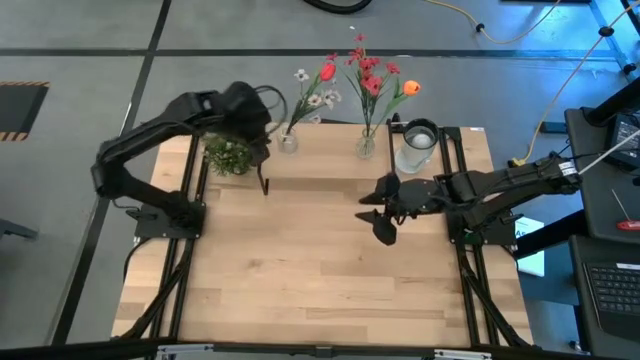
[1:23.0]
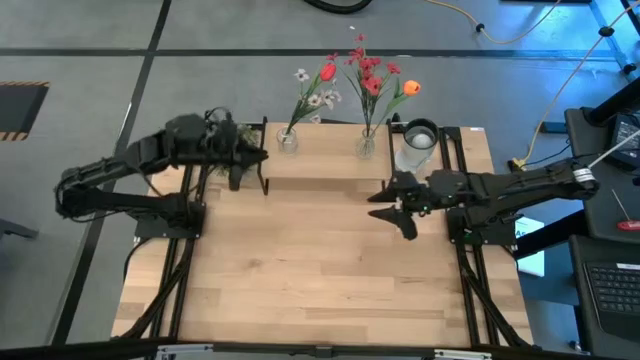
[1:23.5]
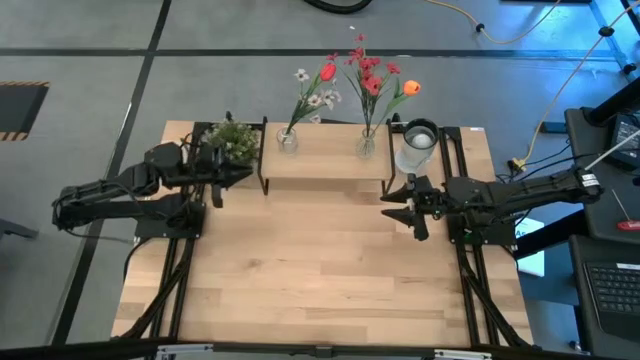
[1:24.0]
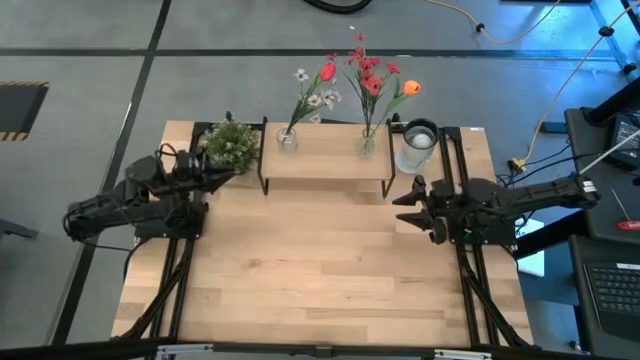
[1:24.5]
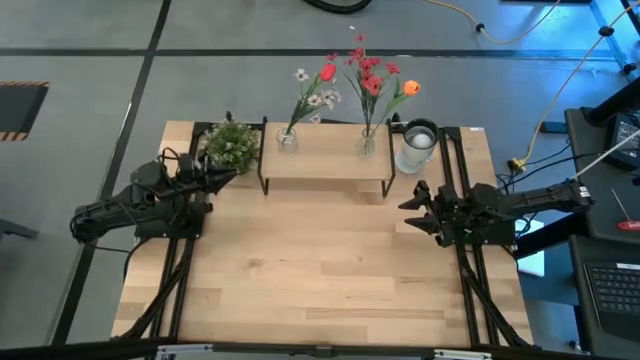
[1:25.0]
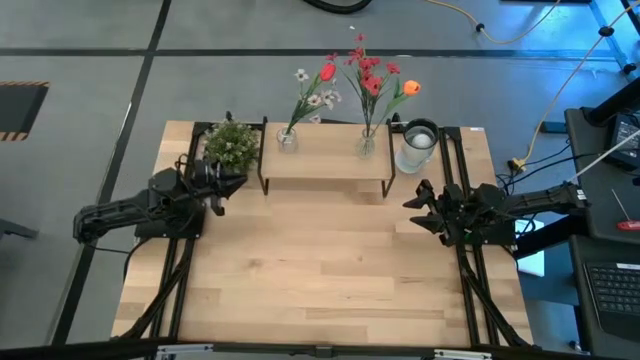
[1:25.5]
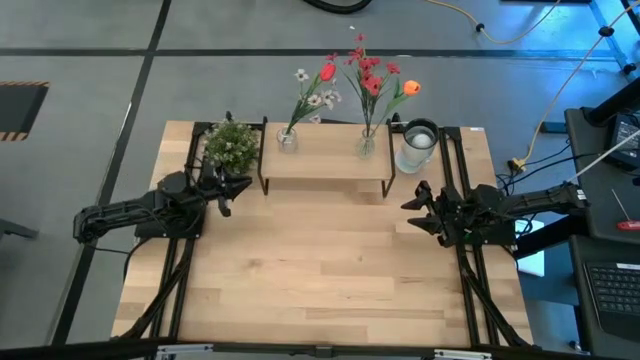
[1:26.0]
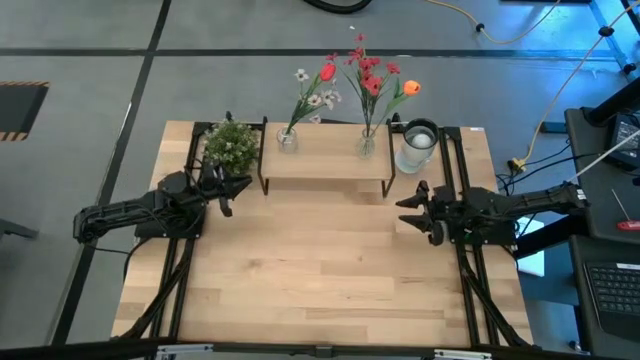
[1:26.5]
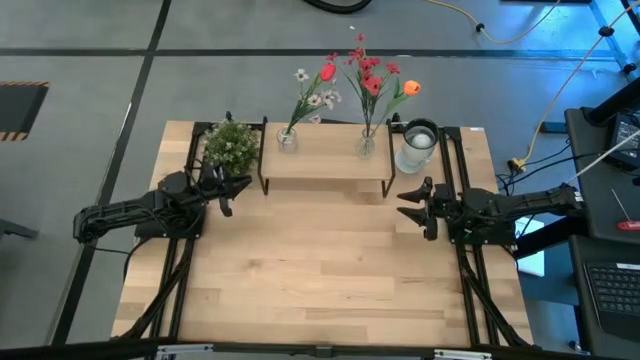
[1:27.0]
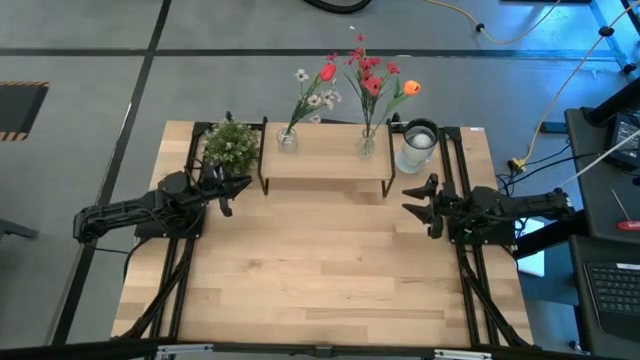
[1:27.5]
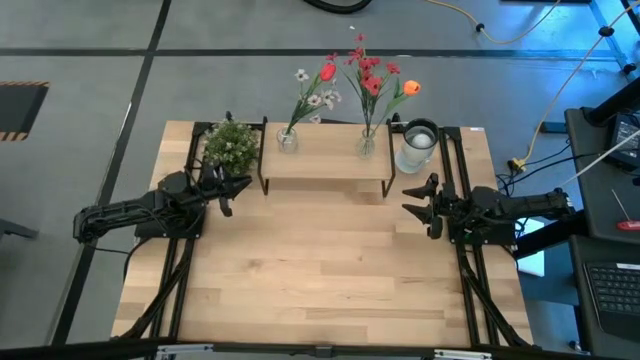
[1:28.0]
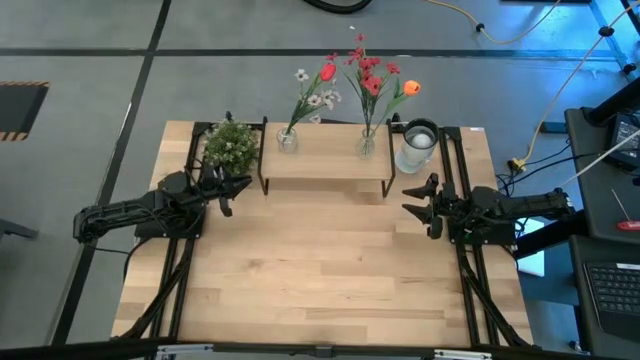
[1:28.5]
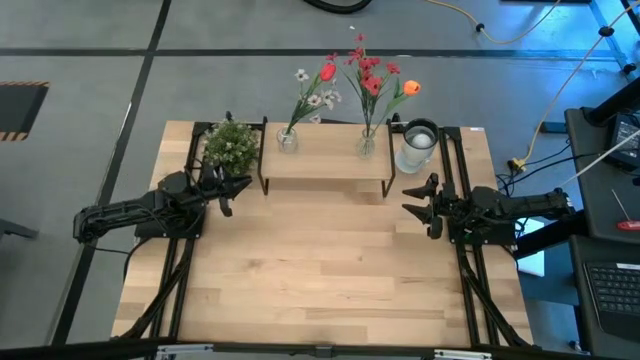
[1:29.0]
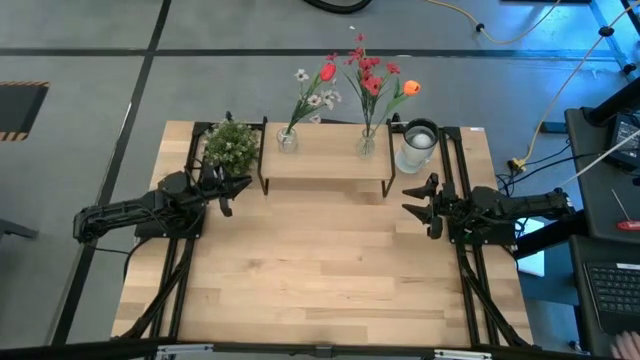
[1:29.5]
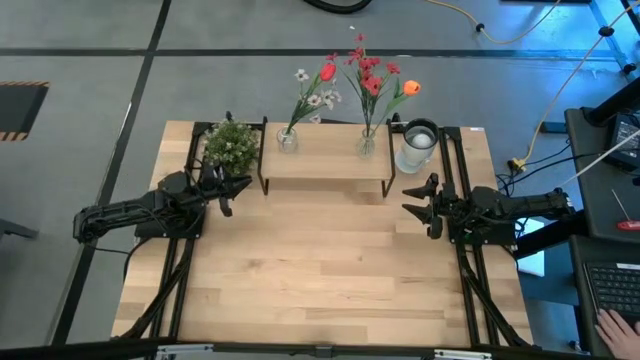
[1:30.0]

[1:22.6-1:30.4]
Task: Pick and place flowers into a vace then onto a shelf
Return to Home Position

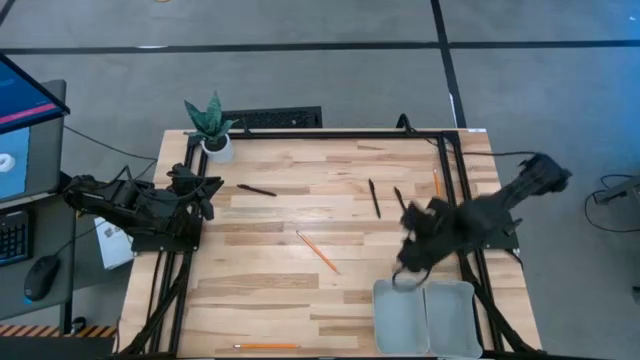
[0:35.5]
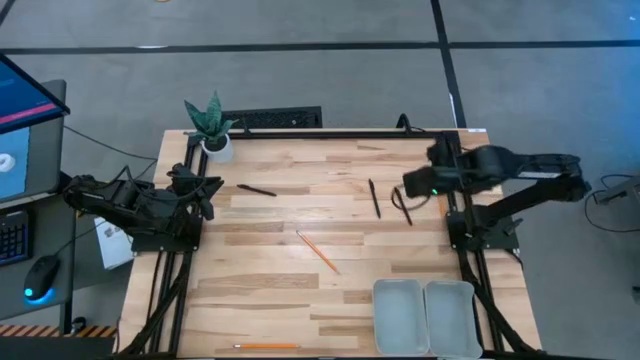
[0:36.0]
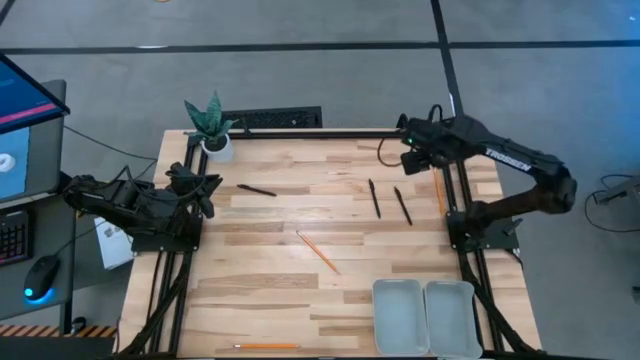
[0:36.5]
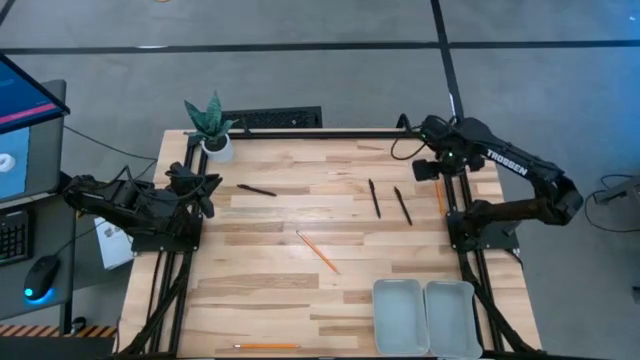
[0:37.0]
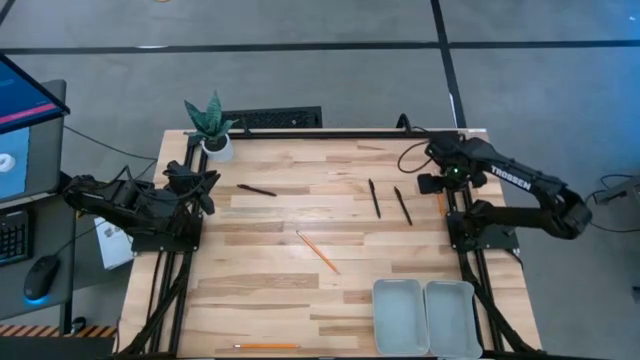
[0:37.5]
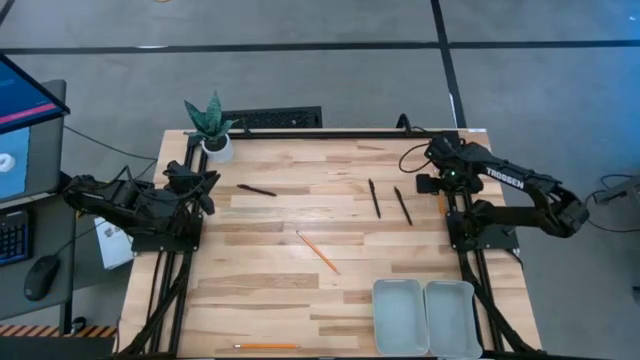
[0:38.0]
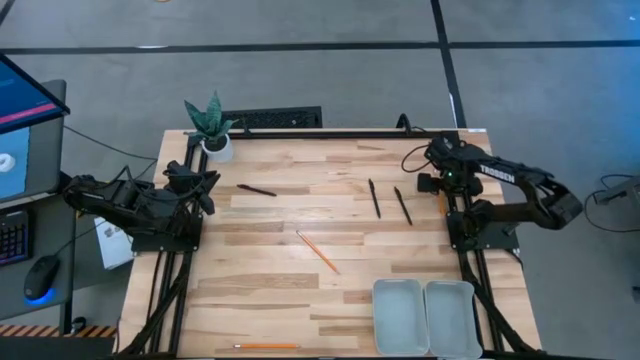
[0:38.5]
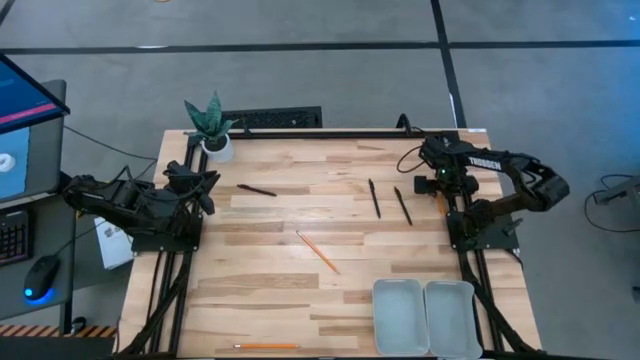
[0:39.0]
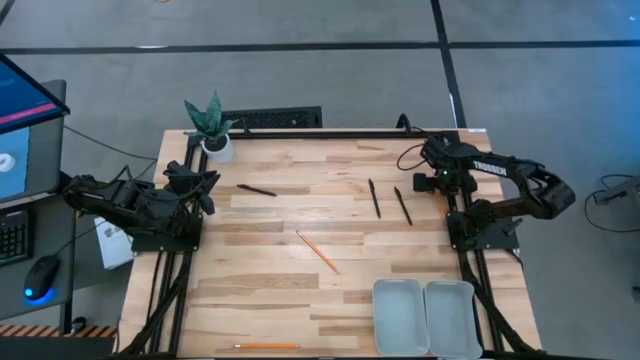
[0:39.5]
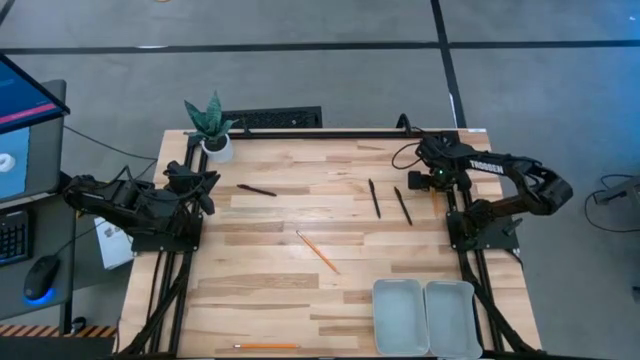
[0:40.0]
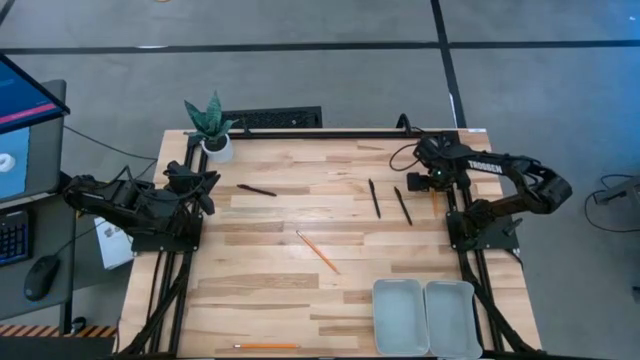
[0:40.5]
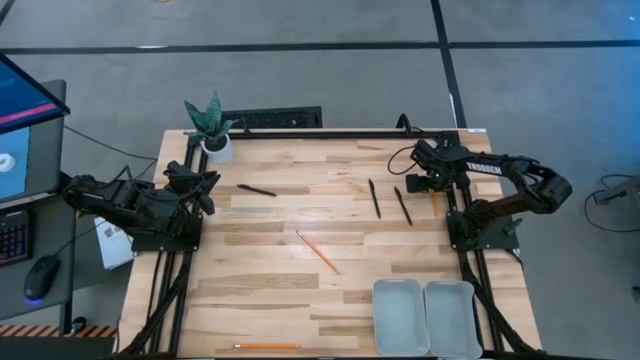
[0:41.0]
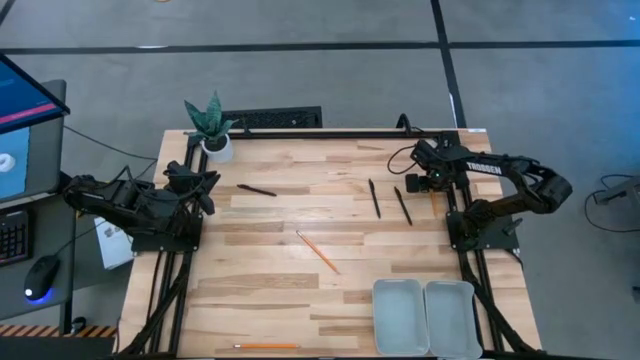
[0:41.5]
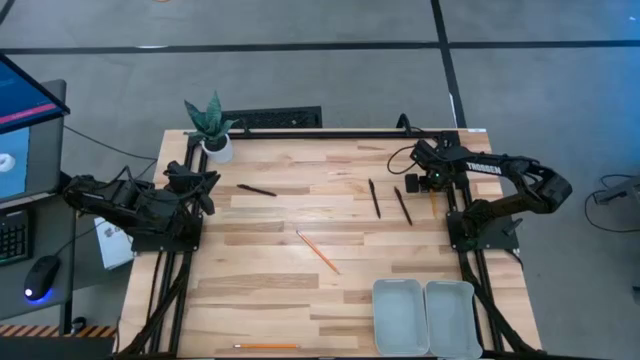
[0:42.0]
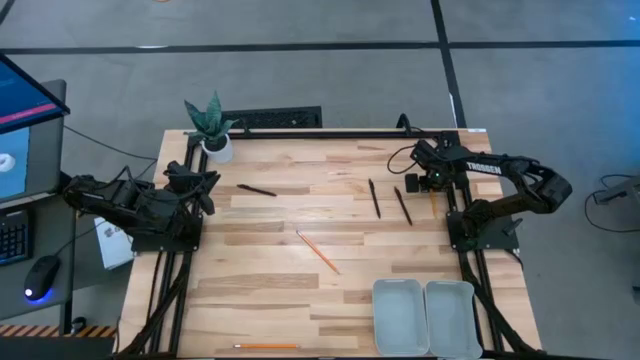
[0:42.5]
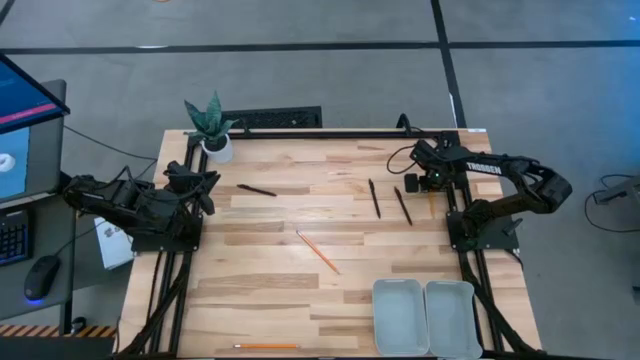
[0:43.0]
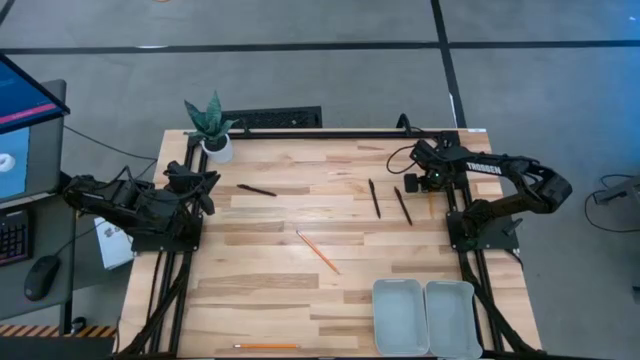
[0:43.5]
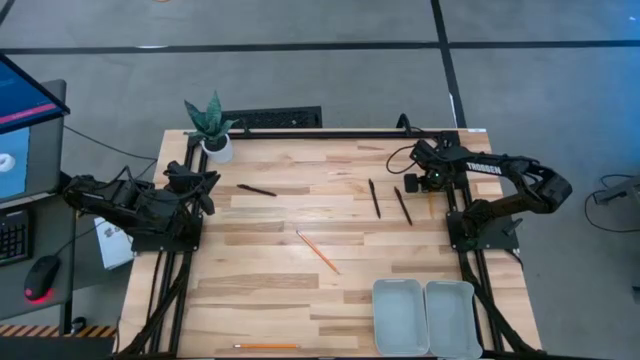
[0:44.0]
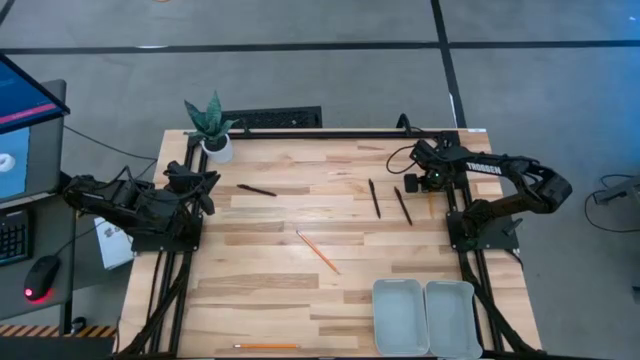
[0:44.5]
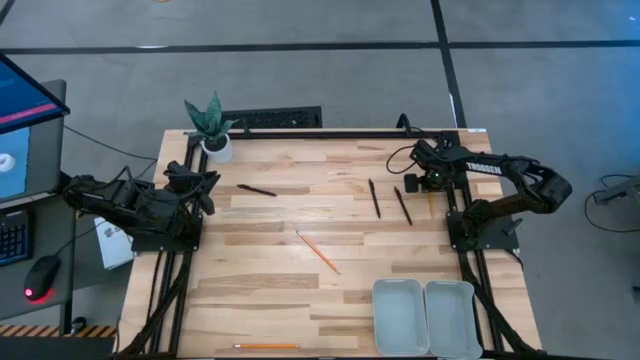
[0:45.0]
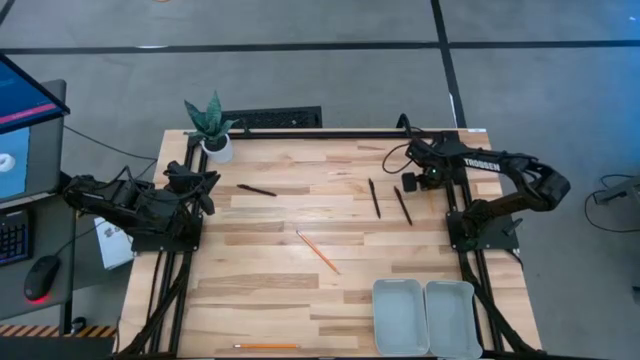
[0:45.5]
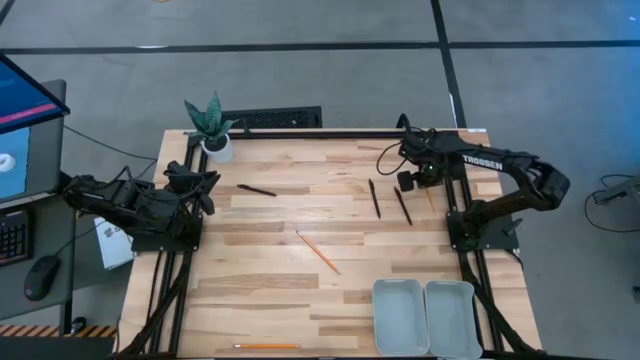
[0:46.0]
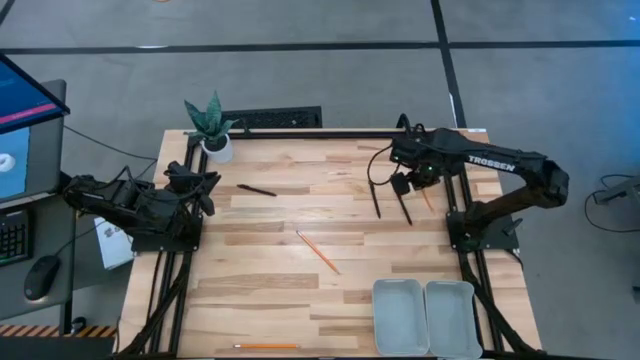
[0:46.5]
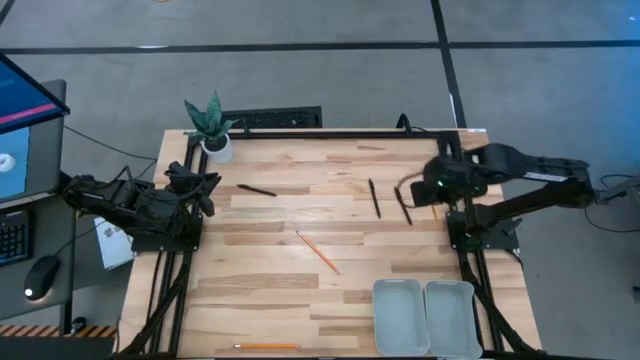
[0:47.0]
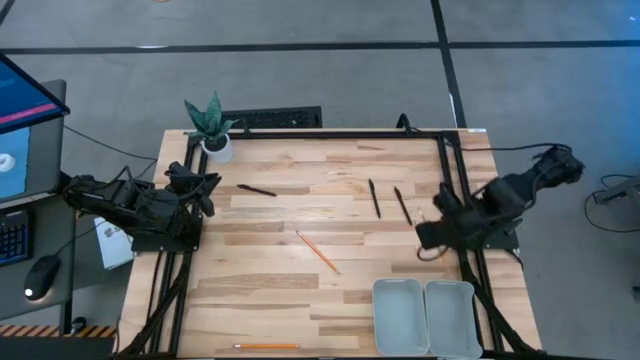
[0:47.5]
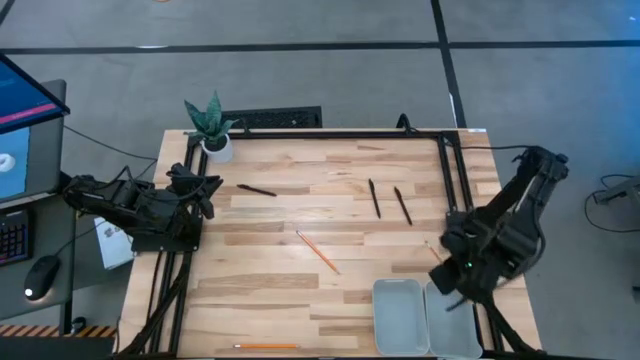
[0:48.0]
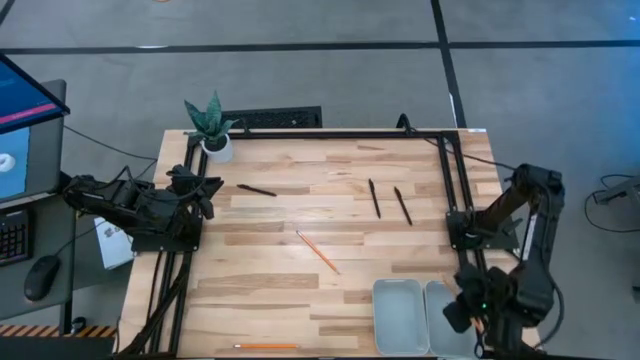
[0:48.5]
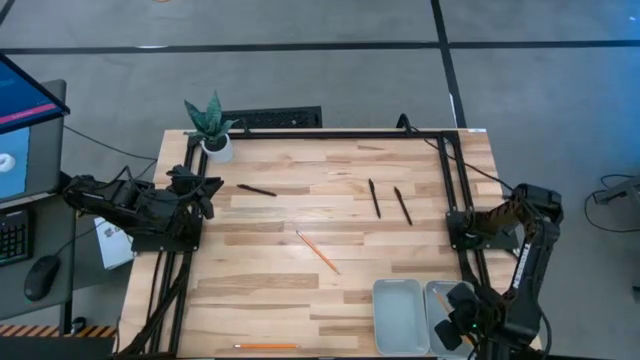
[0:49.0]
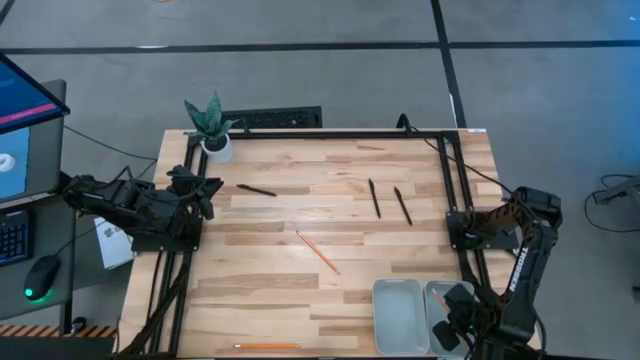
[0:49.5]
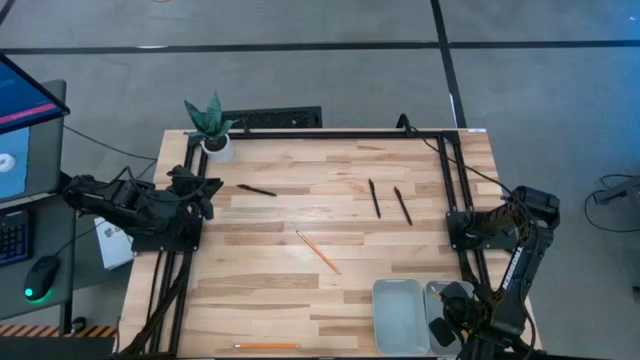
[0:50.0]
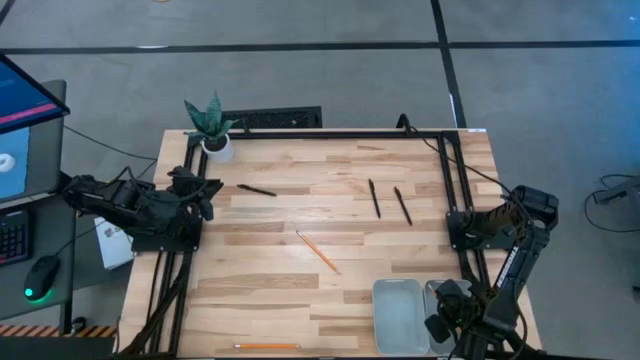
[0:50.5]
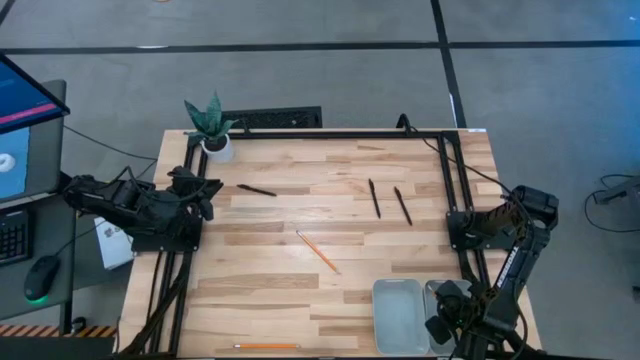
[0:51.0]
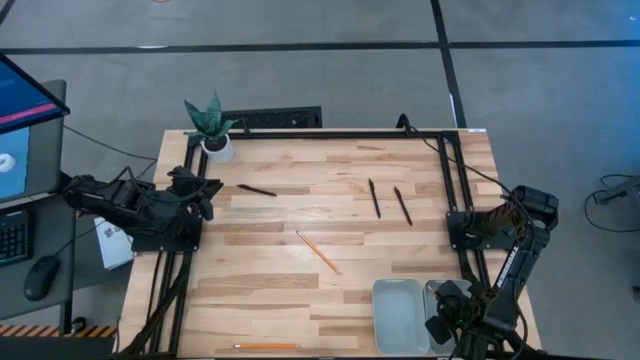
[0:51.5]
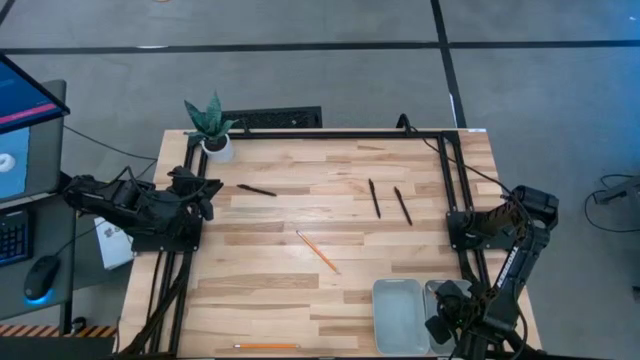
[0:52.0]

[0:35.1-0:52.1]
Task: Sort pens & pencils
Put the top right orange pencil into the bottom right gray bin
